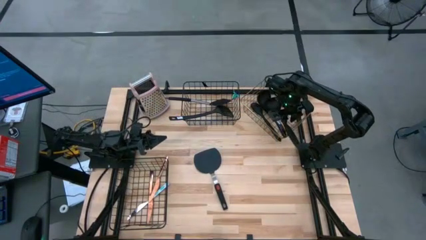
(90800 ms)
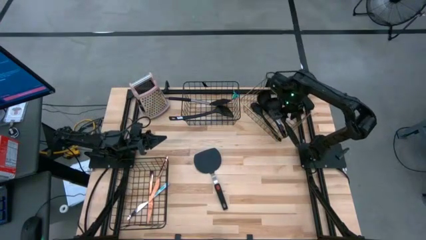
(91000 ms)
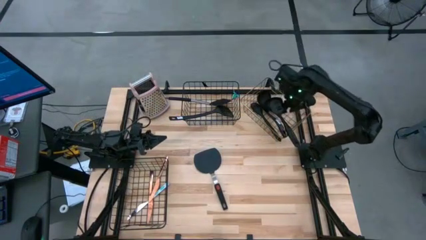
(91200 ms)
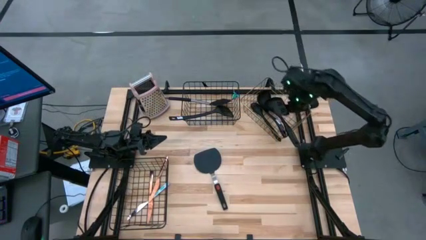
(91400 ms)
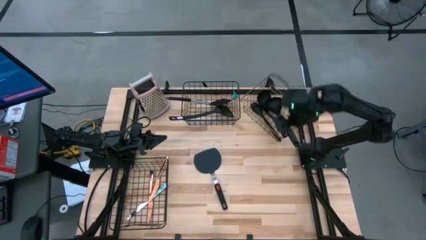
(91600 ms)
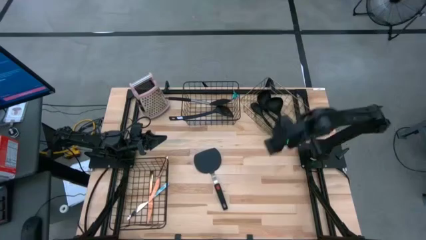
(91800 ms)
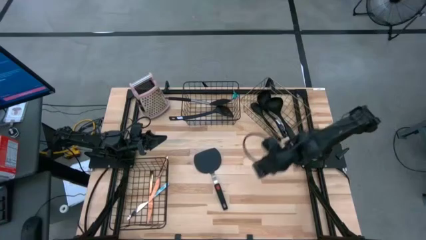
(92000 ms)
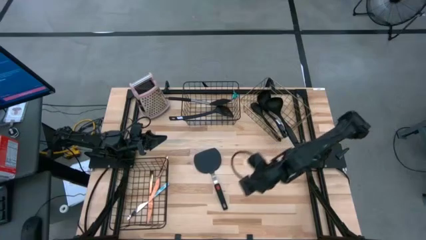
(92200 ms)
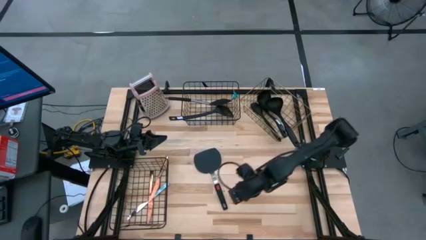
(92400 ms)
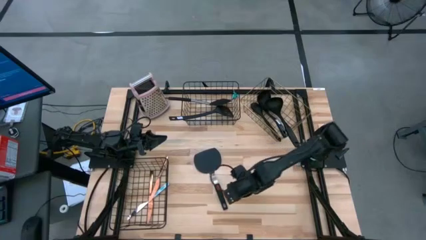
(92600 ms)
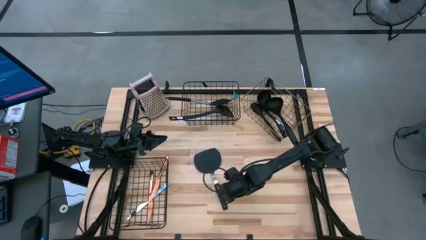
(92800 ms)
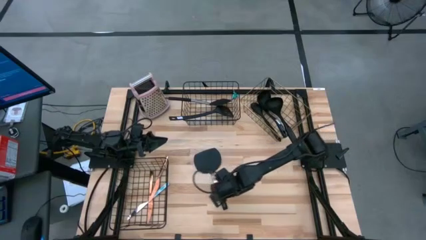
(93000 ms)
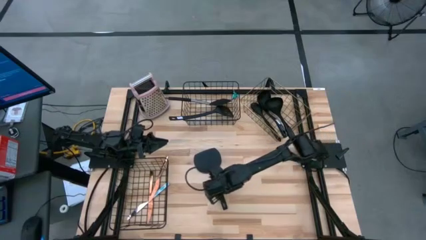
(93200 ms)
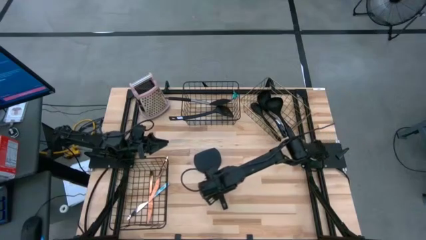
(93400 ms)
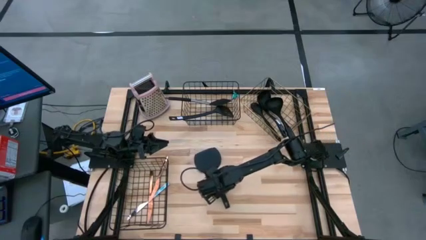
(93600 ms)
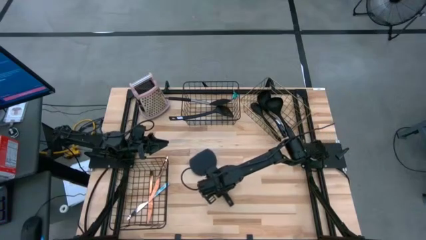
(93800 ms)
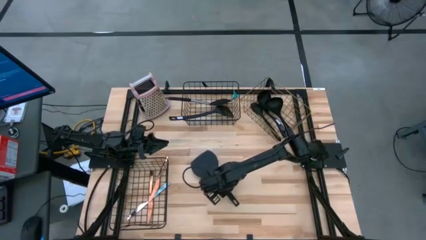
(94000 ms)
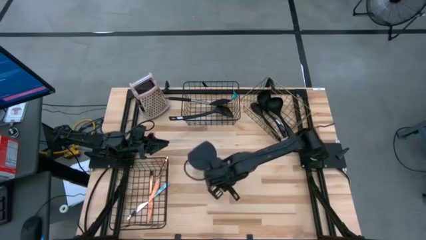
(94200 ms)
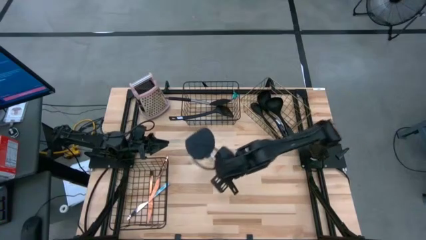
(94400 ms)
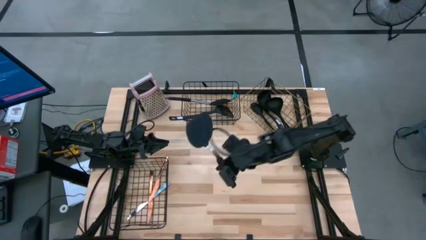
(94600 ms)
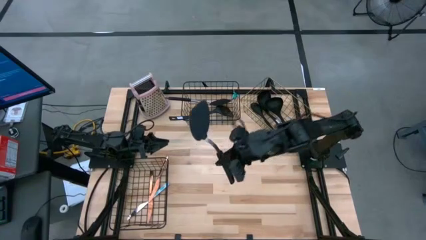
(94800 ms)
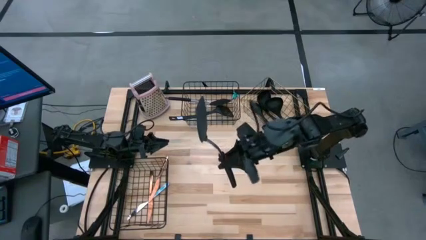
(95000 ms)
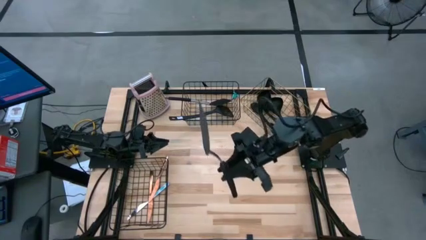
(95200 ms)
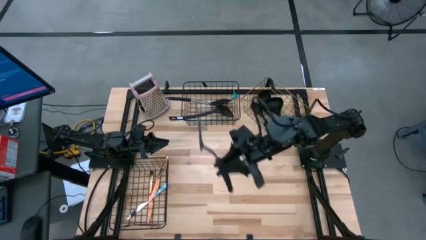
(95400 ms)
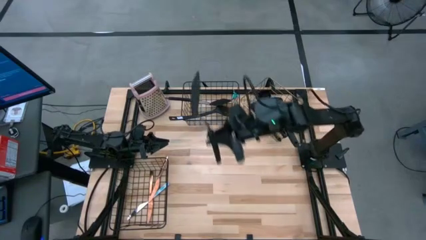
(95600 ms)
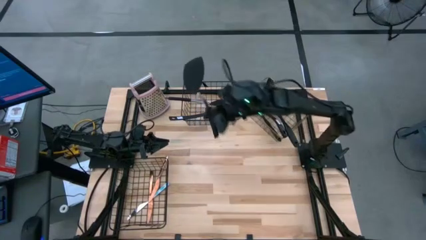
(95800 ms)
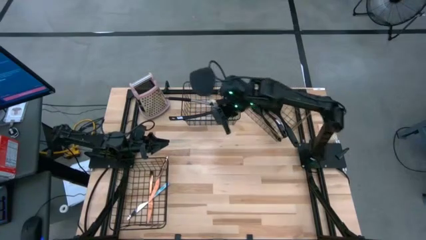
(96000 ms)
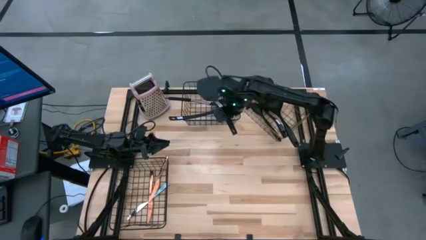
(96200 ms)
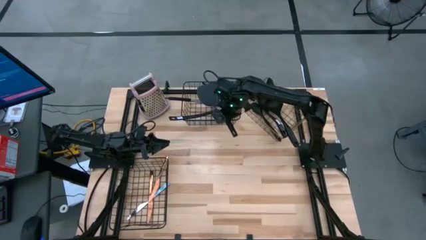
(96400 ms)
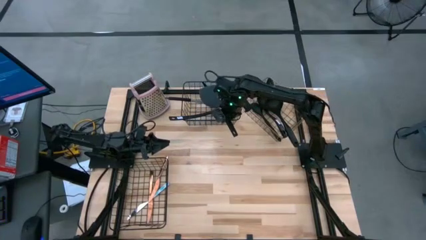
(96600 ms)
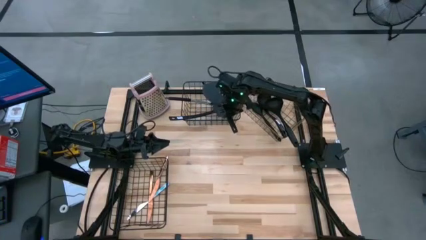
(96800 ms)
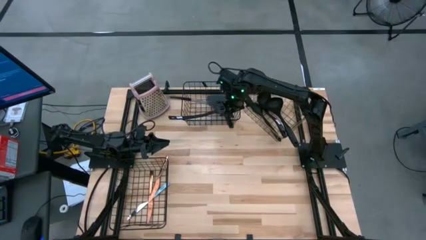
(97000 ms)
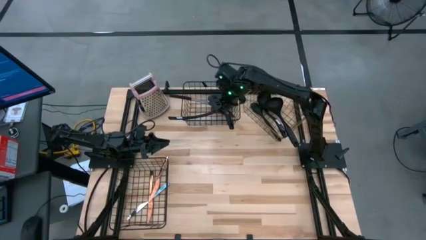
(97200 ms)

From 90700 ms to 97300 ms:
Task: Pick & Place Kitchen Items
Put the black spatula into the top left wire basket

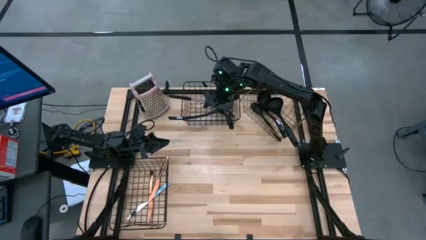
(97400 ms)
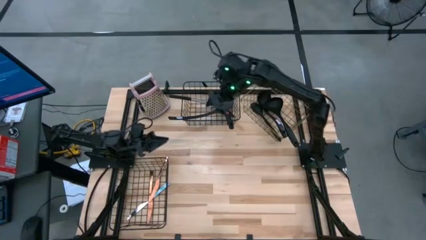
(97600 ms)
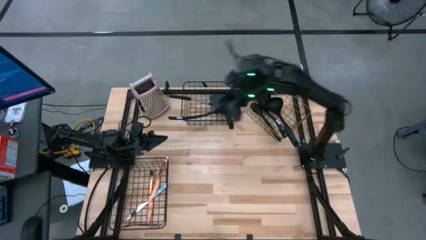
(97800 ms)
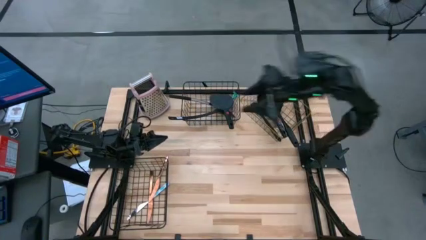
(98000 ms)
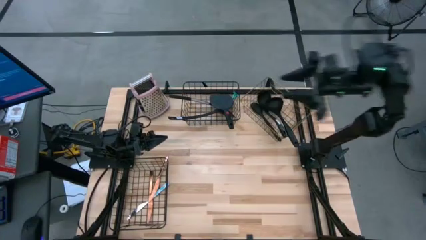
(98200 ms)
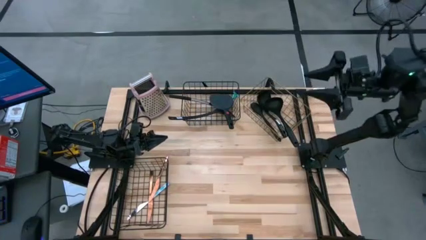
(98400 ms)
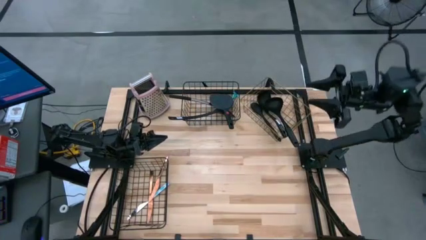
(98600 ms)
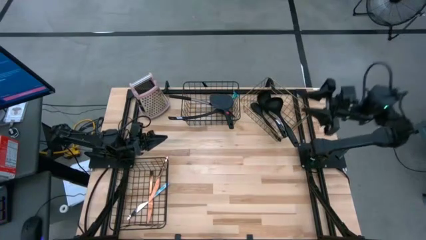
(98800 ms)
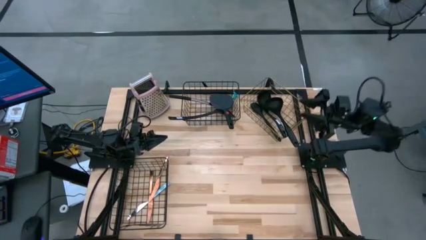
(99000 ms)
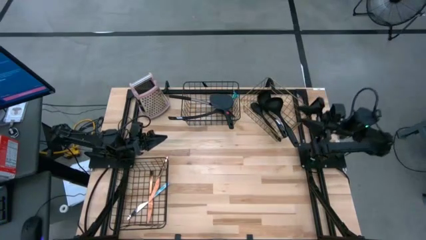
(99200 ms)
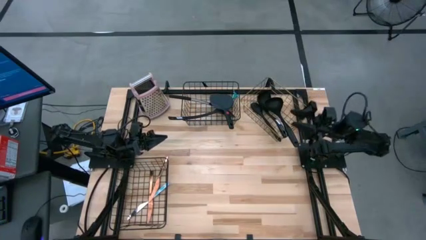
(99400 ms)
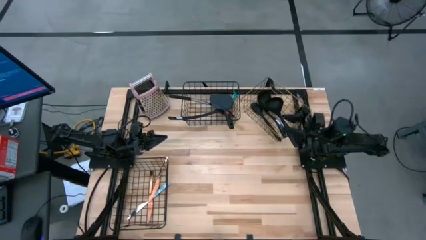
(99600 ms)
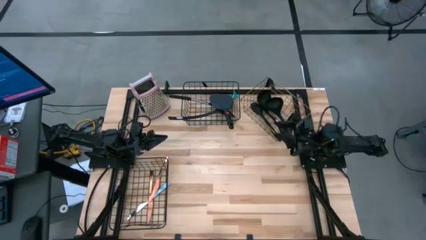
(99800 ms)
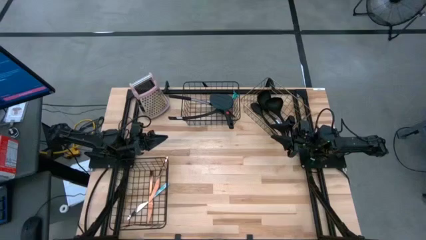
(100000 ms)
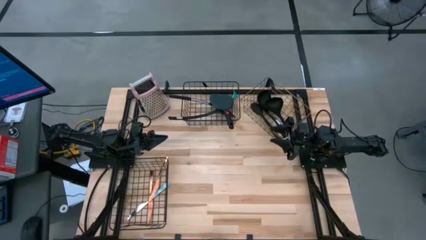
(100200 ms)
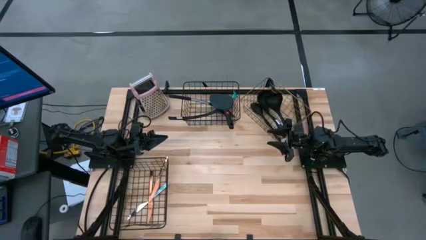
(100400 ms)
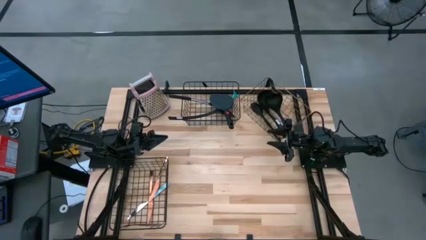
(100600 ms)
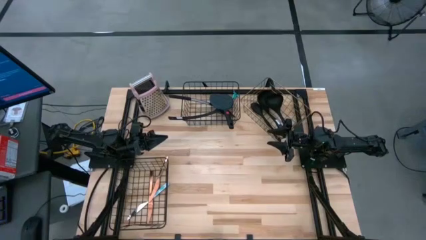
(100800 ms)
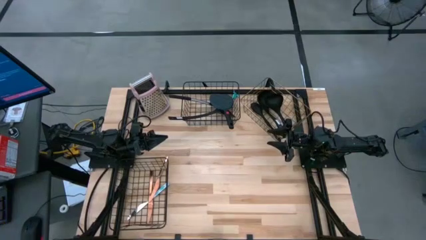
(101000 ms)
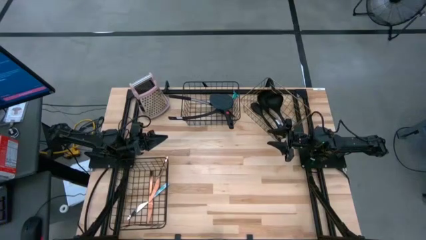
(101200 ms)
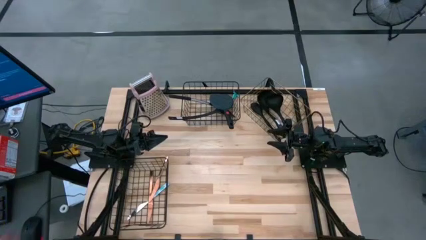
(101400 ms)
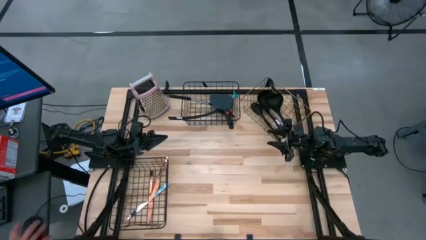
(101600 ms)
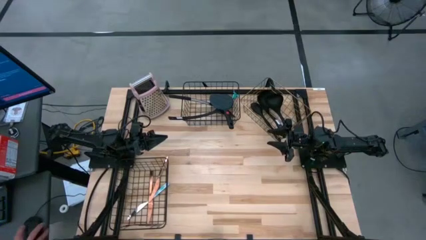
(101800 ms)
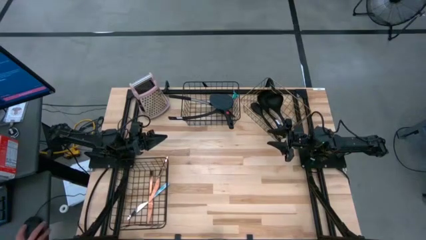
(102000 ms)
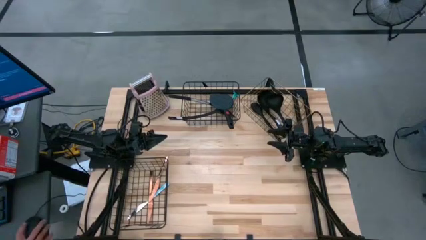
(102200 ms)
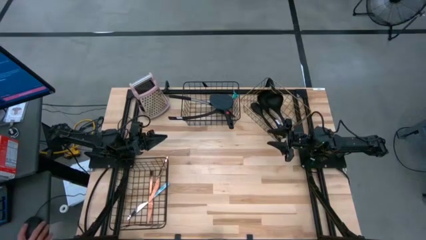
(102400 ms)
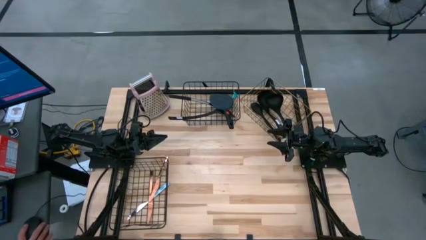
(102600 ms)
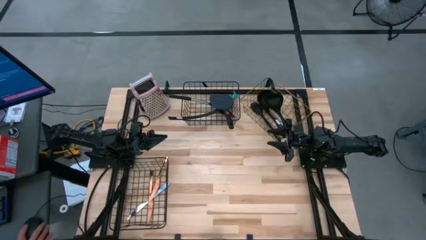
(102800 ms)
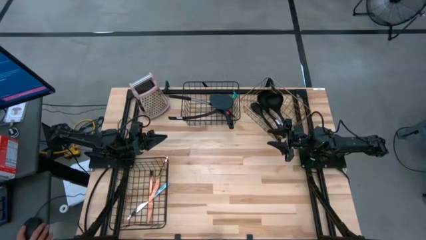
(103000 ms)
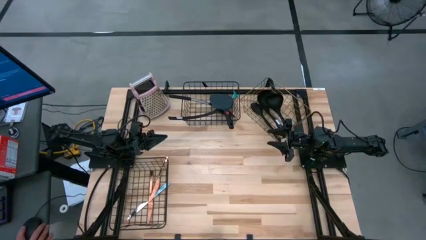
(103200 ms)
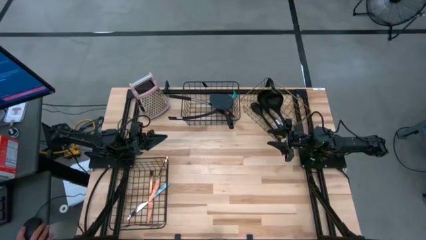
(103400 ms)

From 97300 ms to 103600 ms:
Return to Home Position

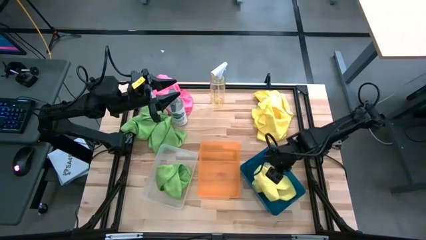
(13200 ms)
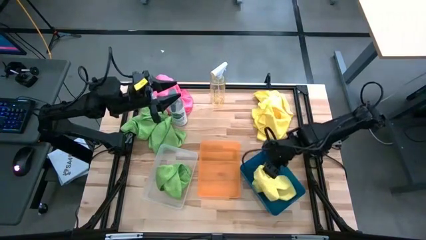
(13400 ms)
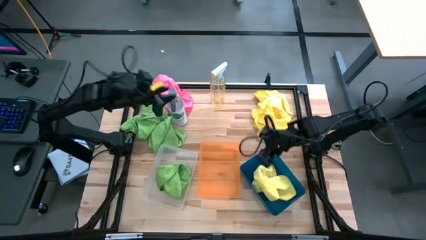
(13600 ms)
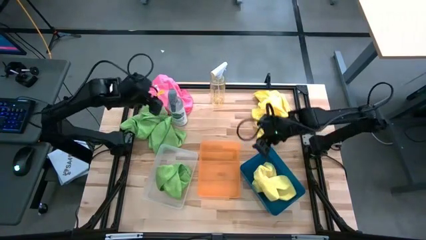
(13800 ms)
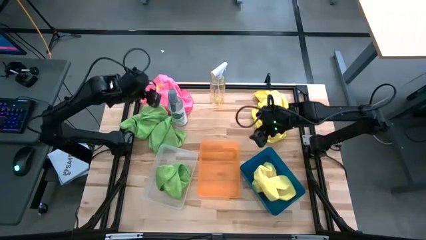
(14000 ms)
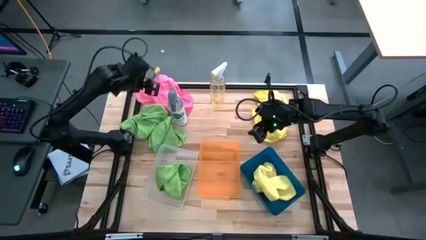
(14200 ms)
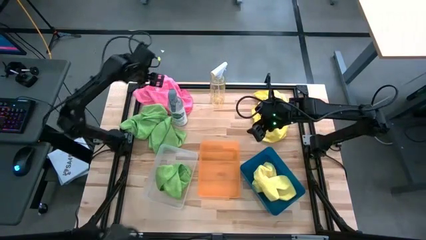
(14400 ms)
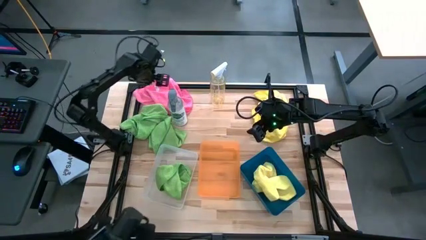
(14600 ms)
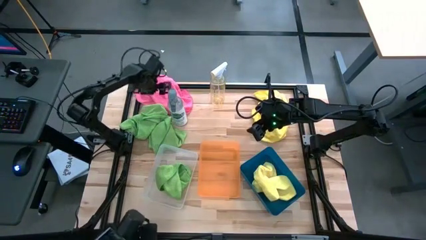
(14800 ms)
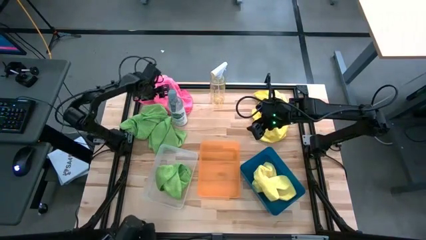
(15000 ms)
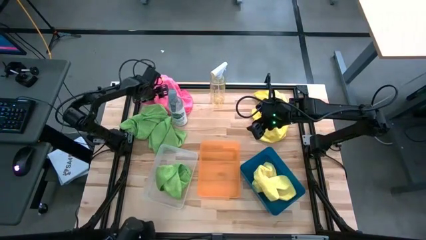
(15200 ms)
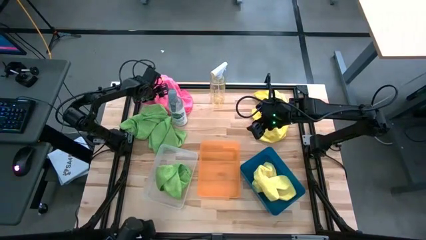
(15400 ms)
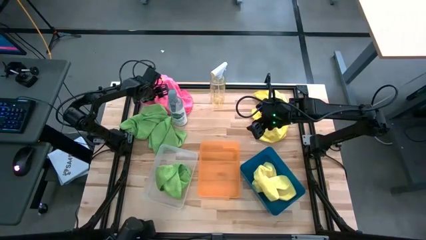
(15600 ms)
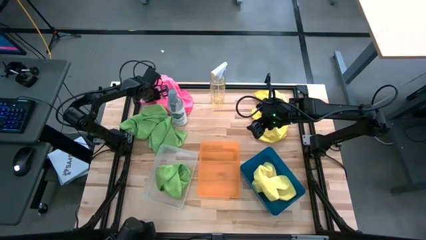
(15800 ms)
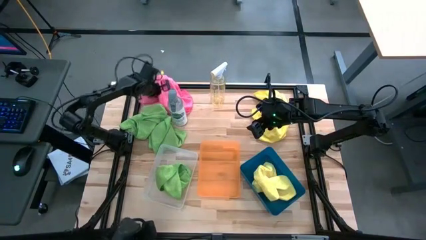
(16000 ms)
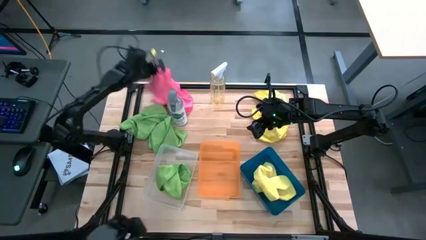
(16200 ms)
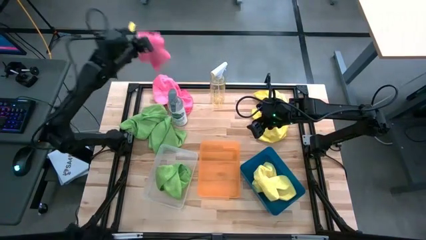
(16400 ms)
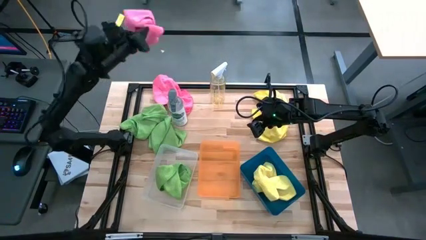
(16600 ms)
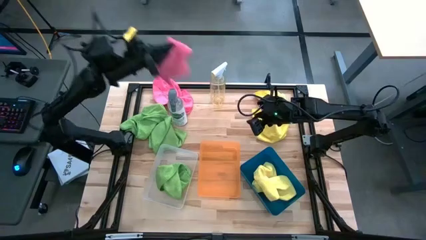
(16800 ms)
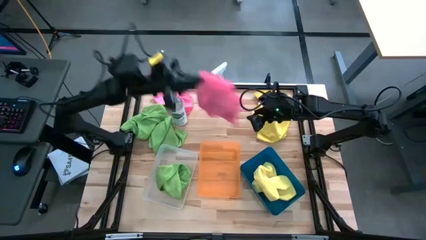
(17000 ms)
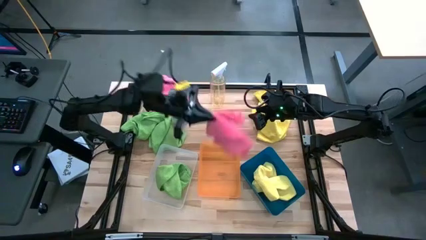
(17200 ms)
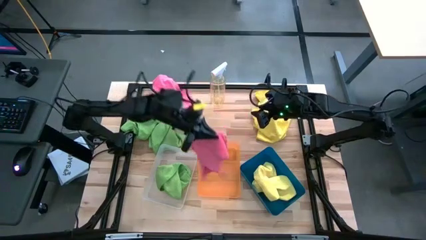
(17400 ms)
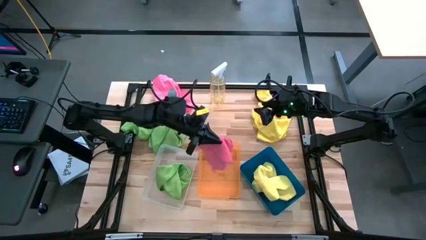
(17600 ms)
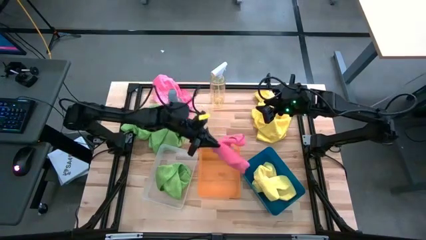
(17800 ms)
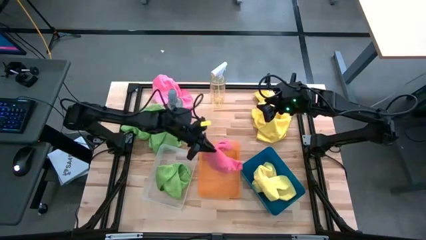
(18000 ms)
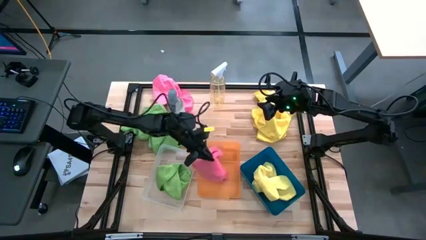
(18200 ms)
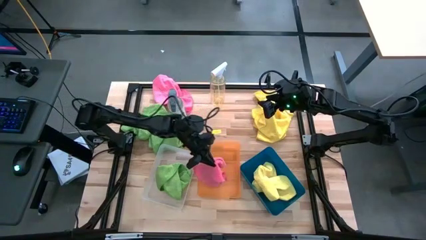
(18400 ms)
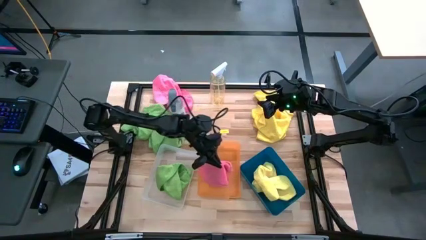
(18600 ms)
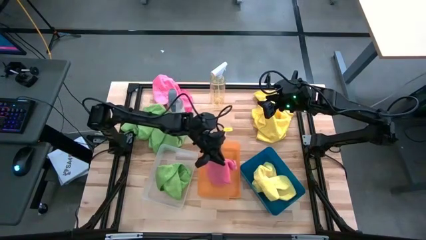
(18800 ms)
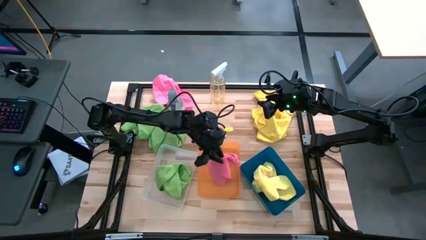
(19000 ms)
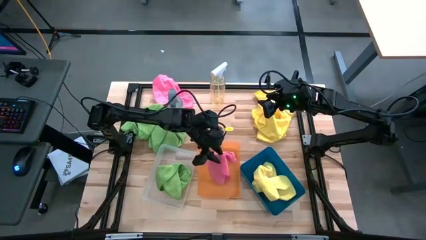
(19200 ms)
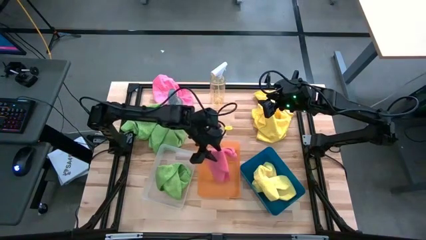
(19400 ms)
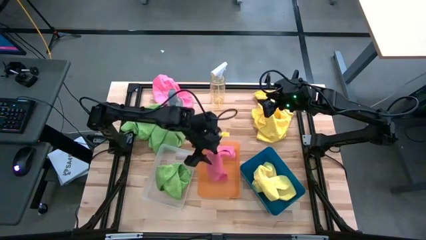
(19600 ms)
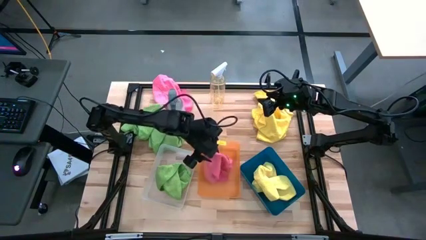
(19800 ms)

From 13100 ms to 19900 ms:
Task: Sort microfiber towel by color & place in baskets
Put the pink towel into the orange bin
